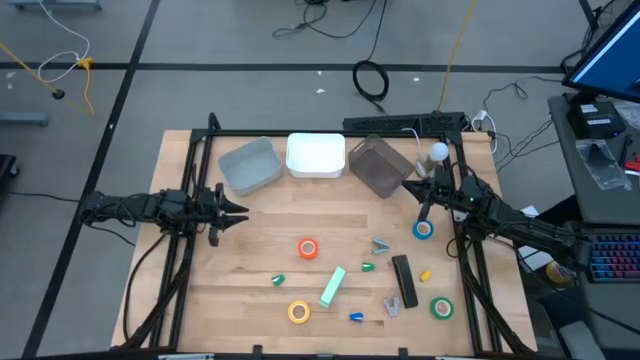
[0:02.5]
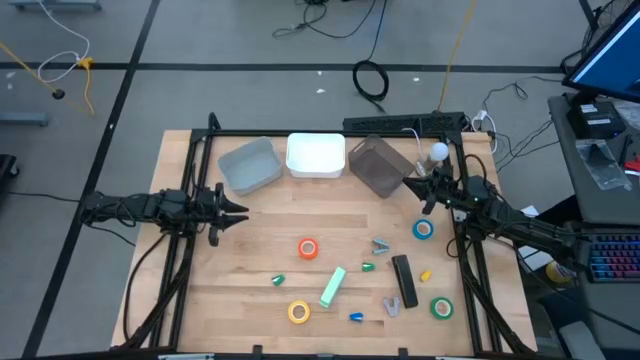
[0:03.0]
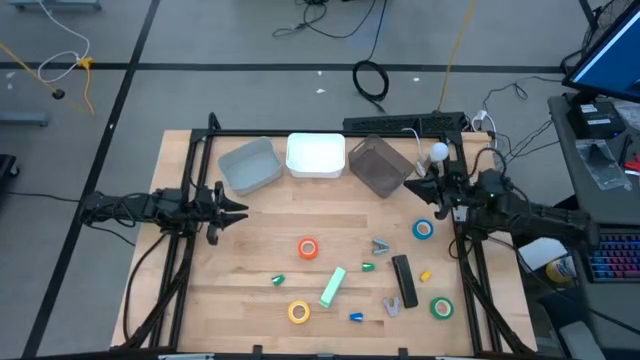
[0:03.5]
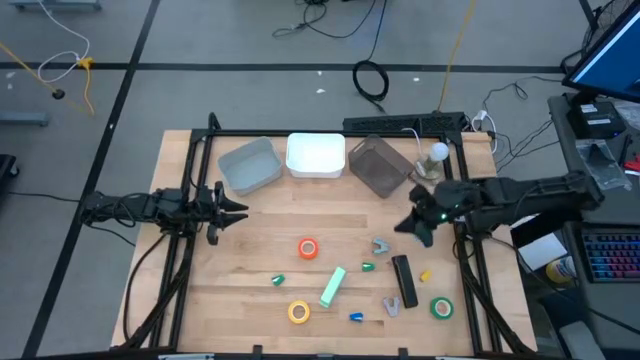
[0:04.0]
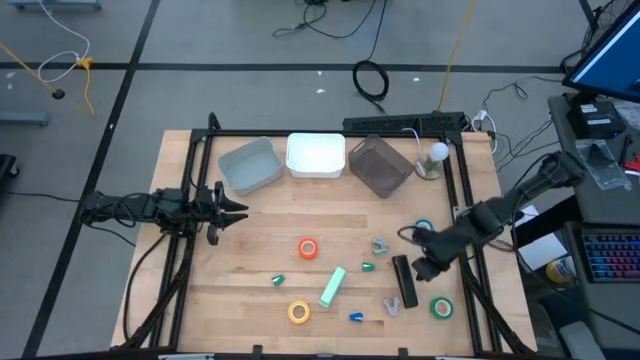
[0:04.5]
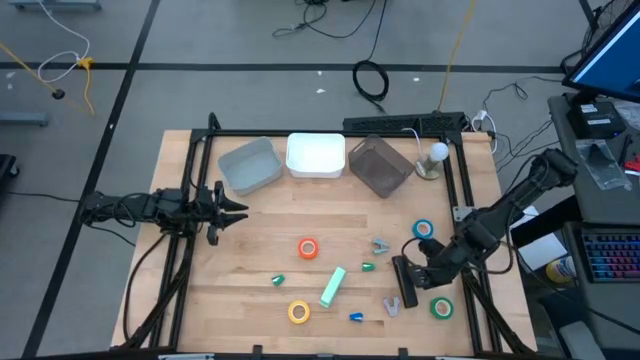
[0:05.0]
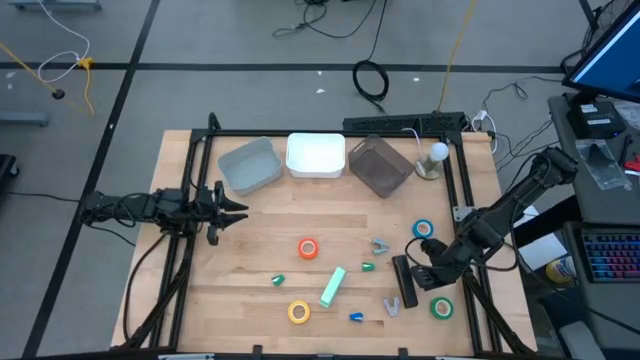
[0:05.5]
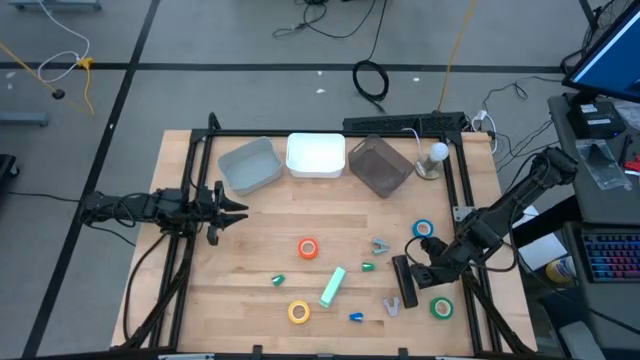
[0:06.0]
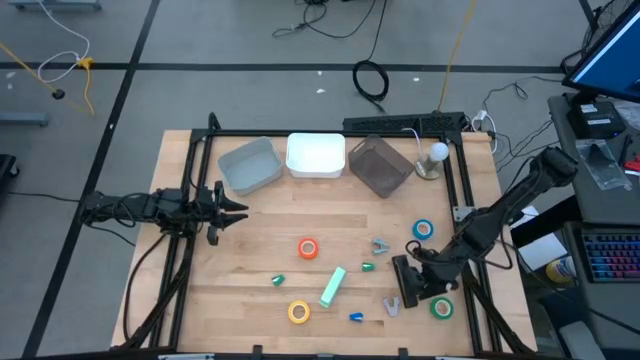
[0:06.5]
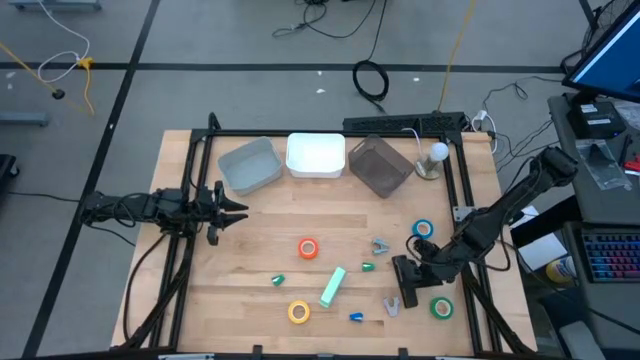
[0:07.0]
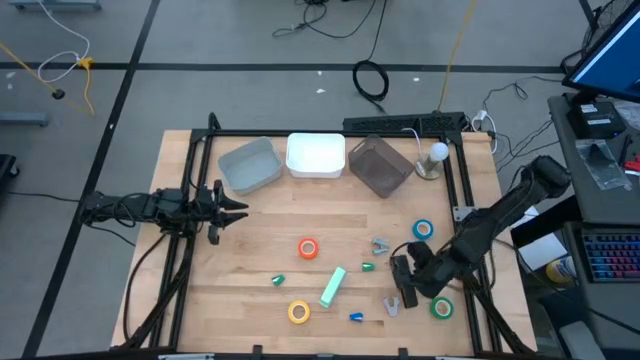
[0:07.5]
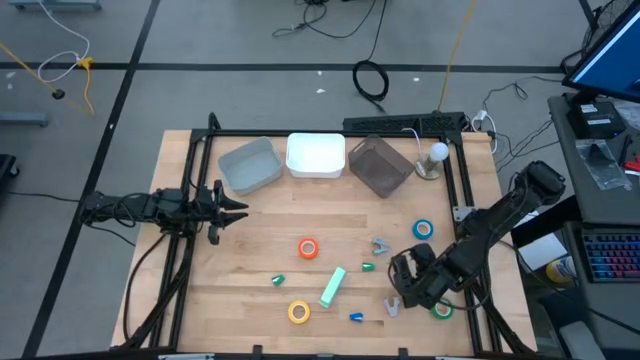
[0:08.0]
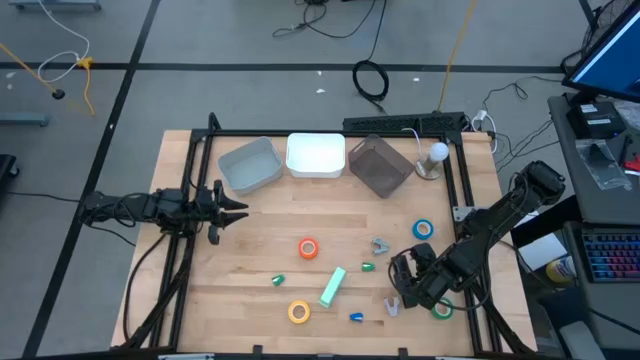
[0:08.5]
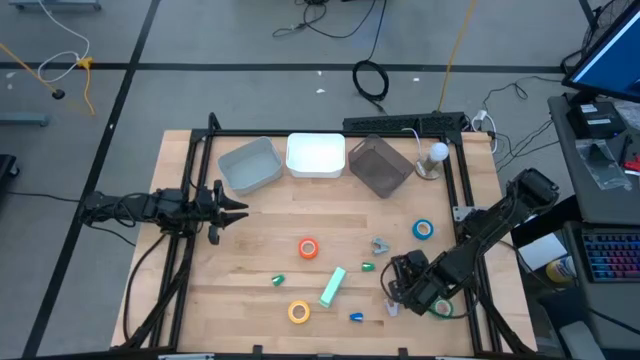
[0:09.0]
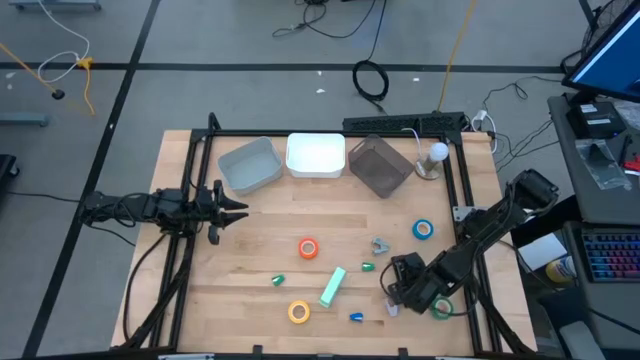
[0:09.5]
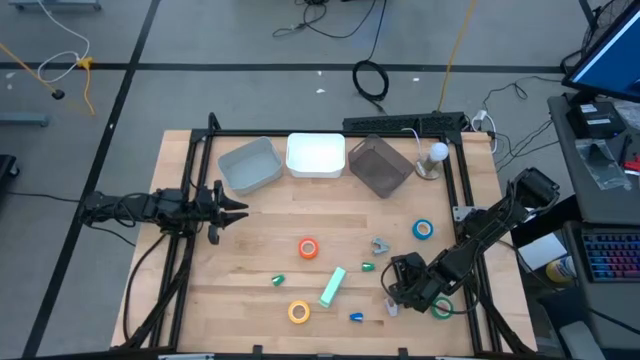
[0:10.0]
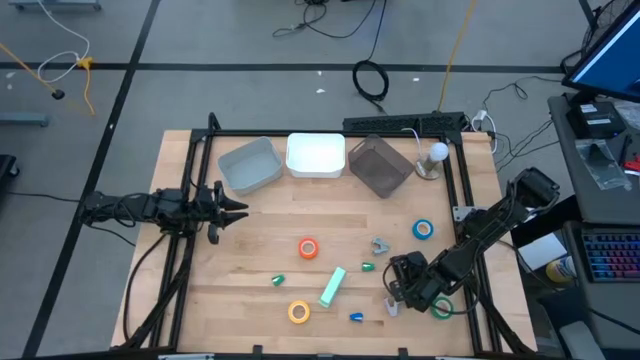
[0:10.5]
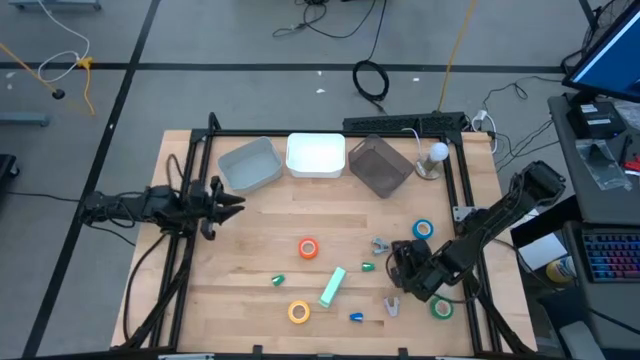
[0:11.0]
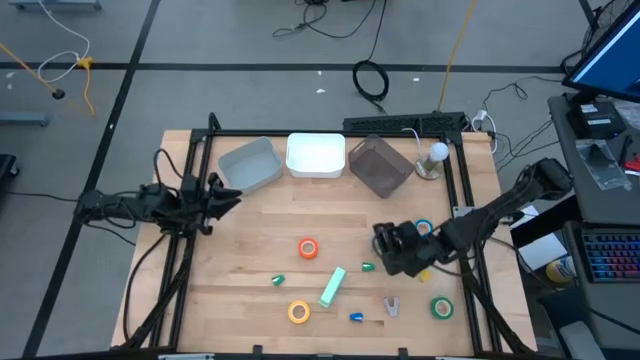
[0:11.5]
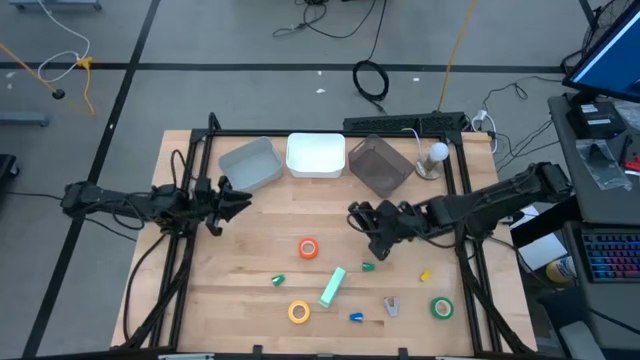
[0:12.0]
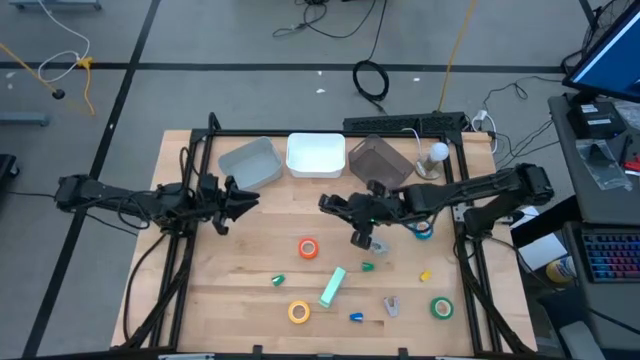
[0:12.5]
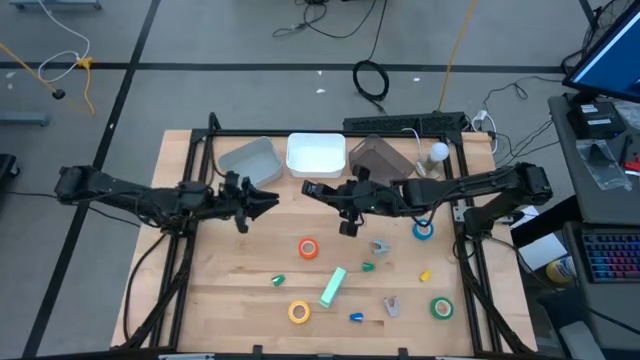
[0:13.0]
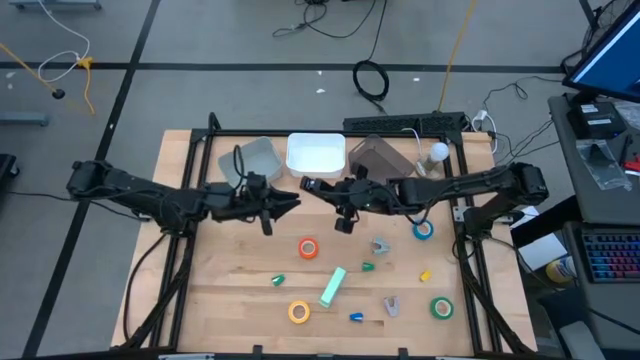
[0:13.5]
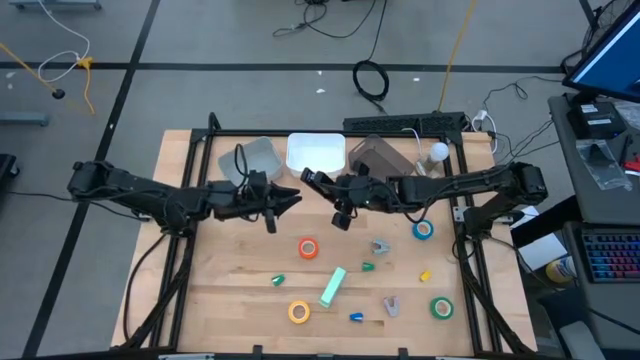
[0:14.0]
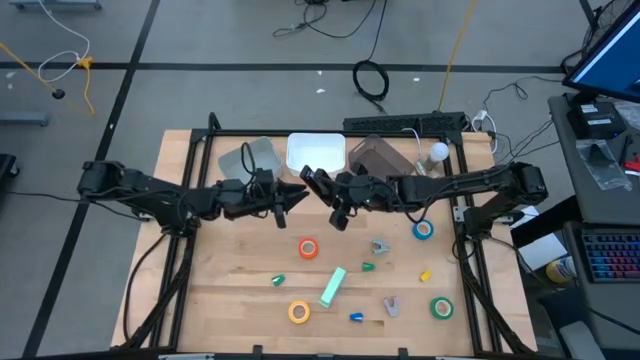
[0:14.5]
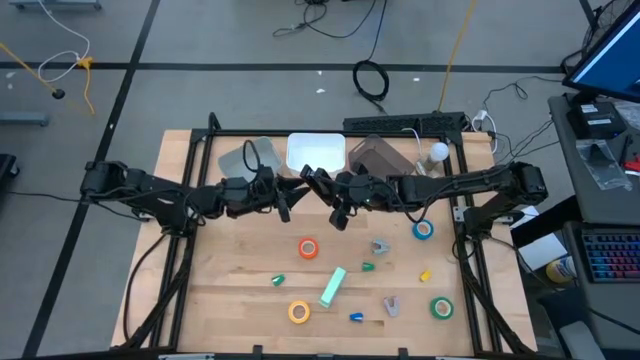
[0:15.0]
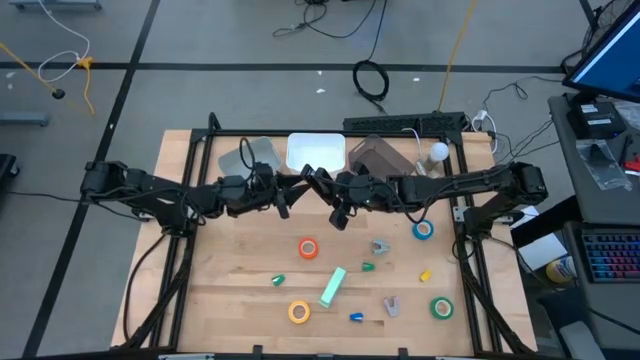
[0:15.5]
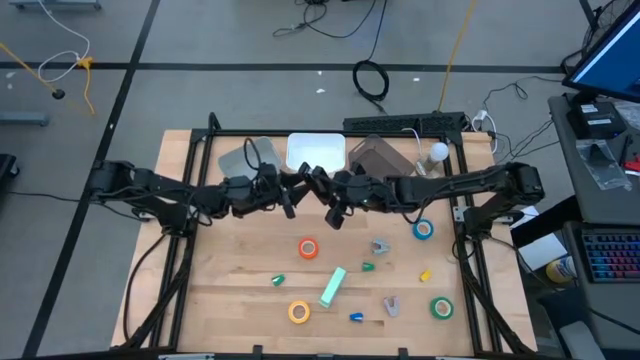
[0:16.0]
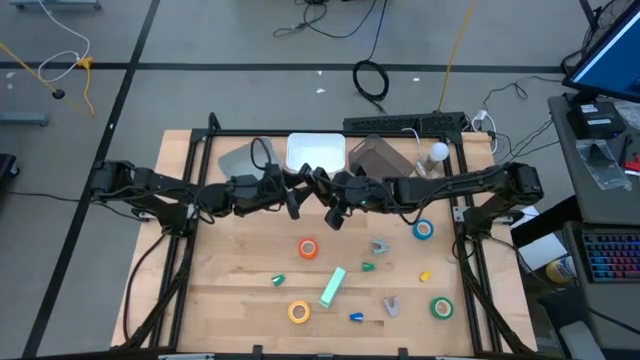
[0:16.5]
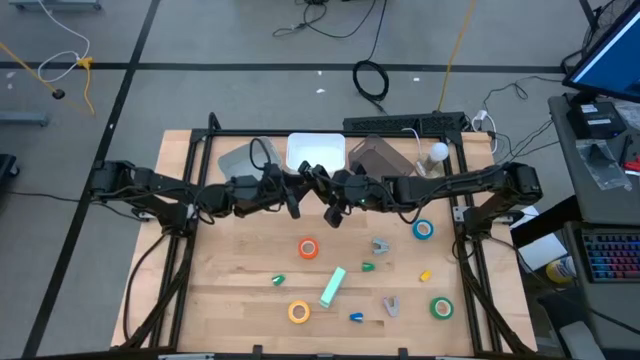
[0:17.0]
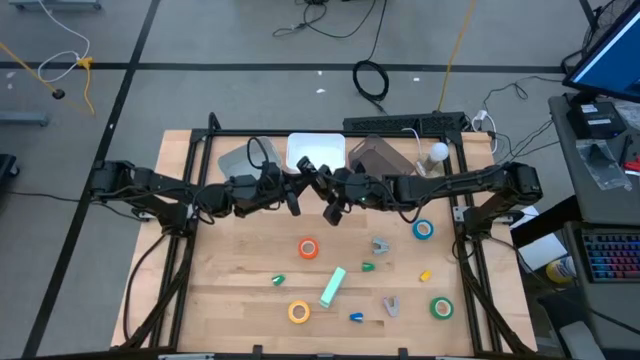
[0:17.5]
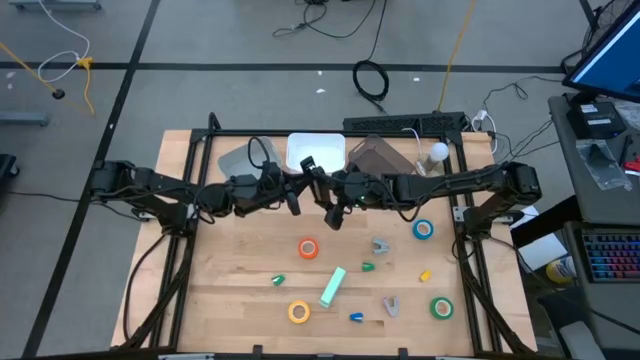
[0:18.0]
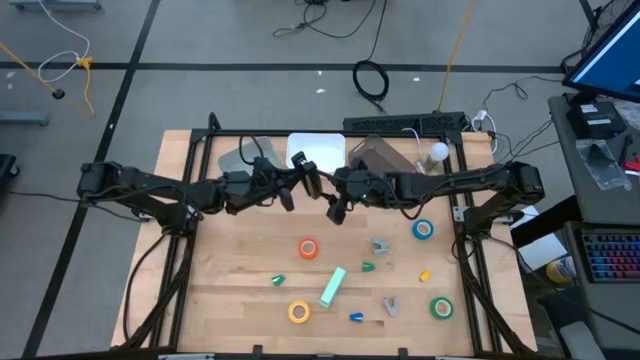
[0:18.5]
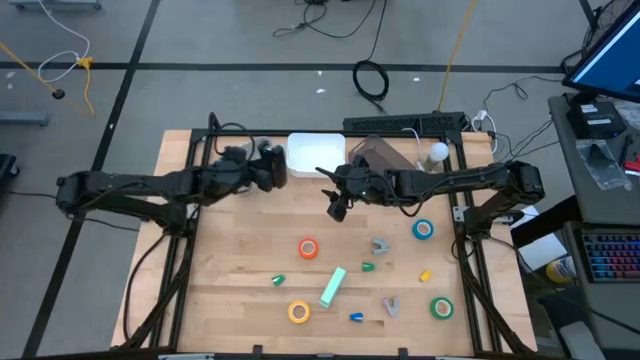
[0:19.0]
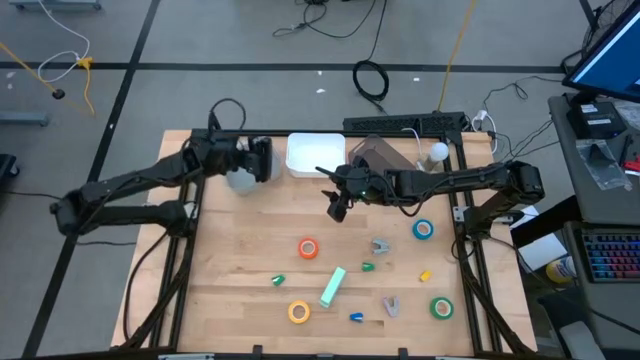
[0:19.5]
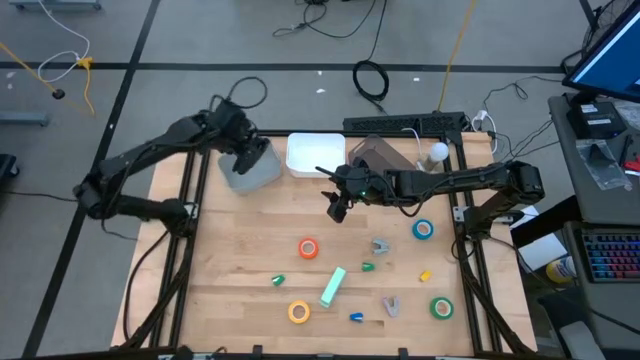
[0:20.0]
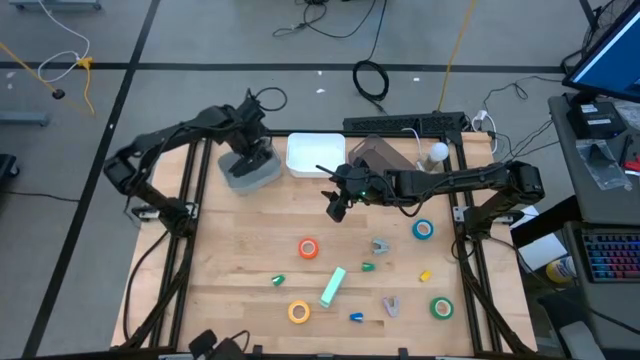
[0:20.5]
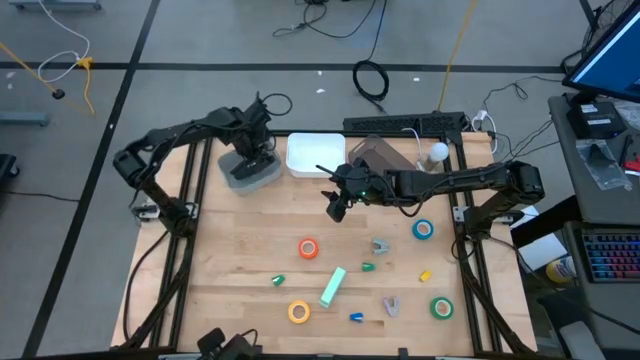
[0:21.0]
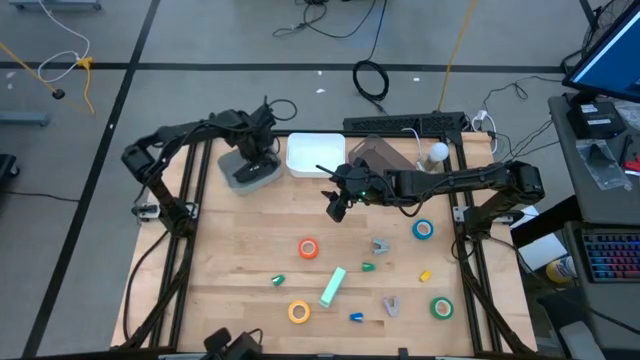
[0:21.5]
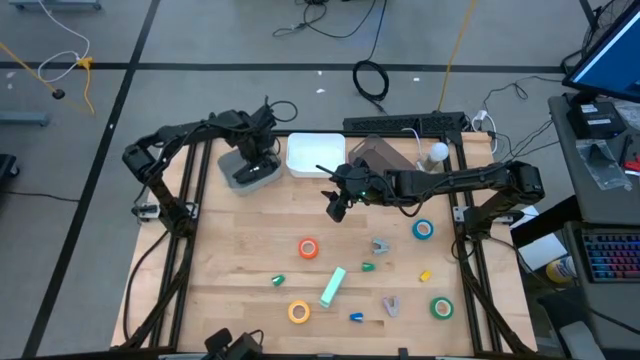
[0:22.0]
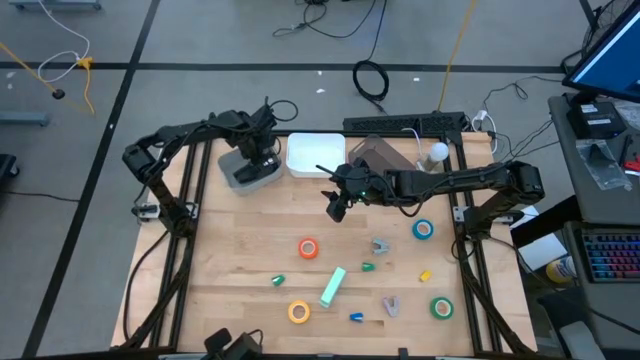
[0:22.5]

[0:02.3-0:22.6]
Task: Pick and place Stapler, Stapler remover, tape
Put the black stapler into the gray bin
